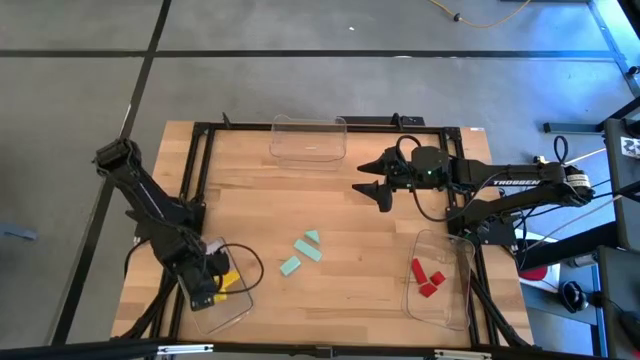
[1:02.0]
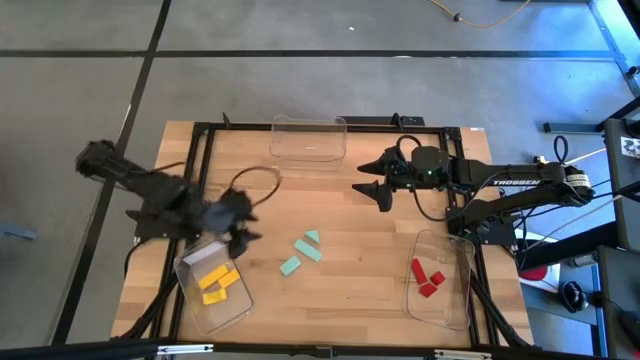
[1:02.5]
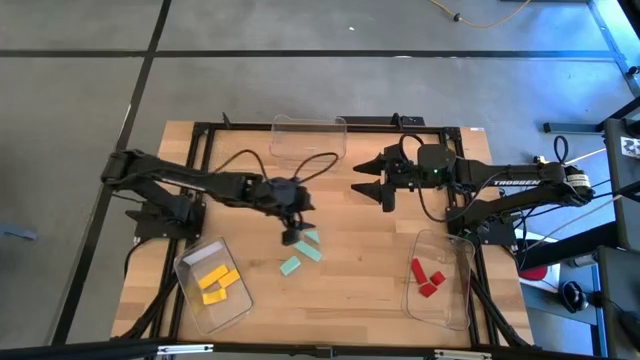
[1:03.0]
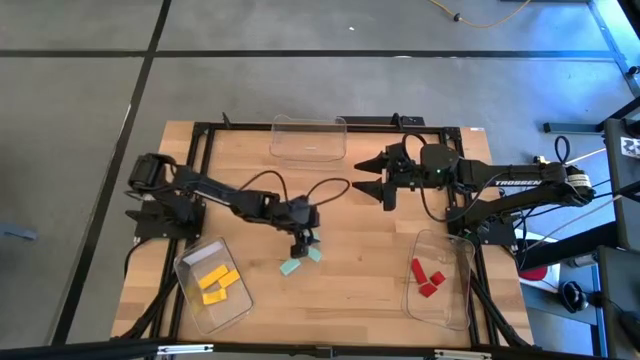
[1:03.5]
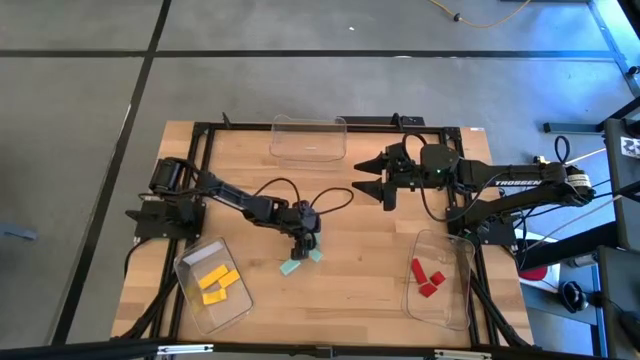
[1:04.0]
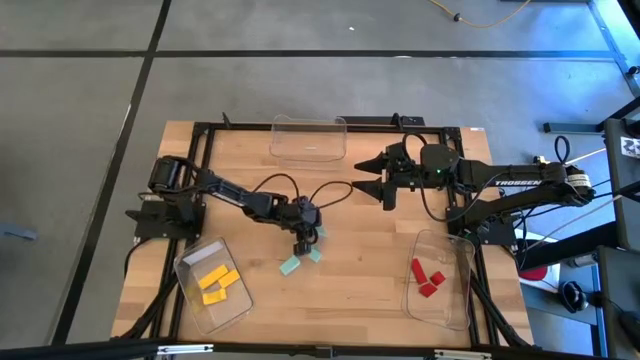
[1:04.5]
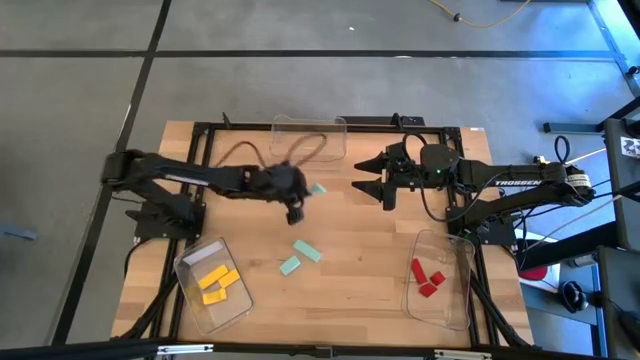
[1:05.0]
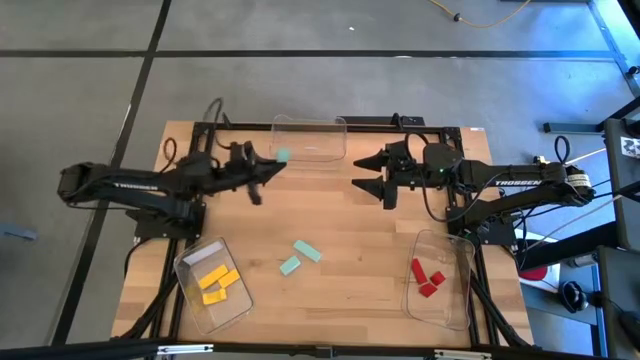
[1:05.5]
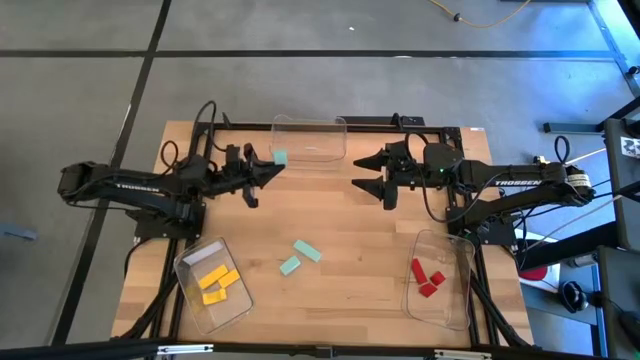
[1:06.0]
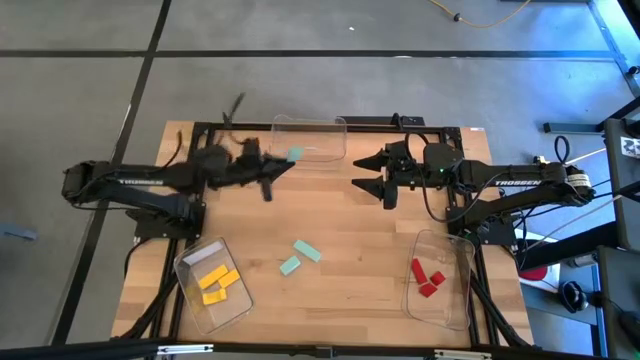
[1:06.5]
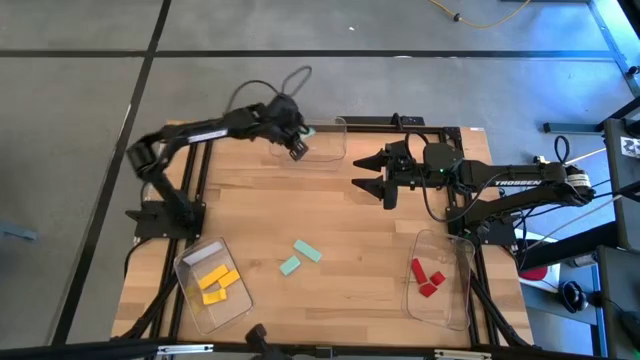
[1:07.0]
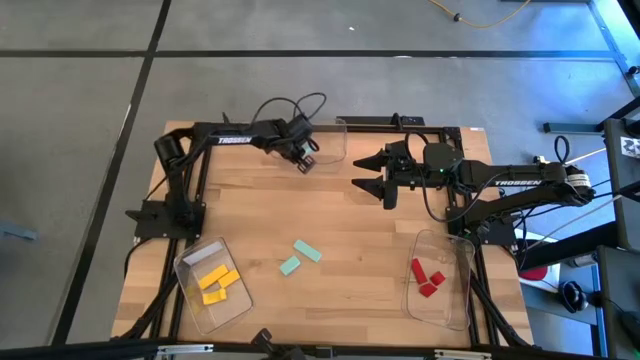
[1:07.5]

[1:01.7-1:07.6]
Task: Sort & place blocks by color
Put the top blue block into the top center transparent bin

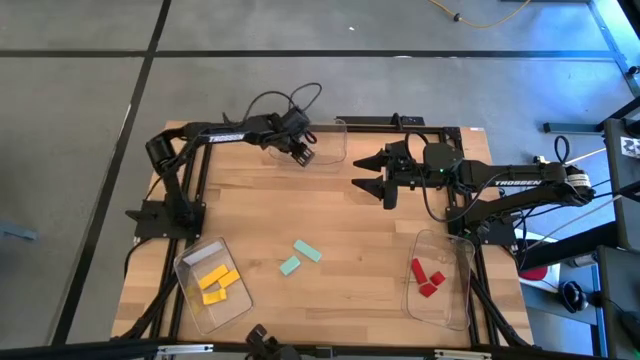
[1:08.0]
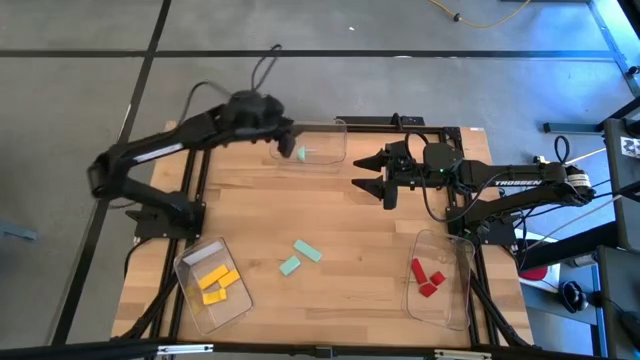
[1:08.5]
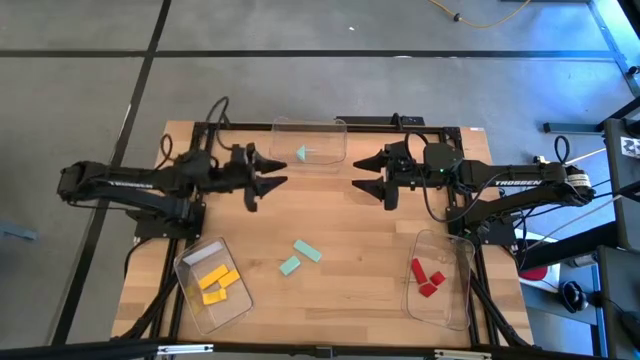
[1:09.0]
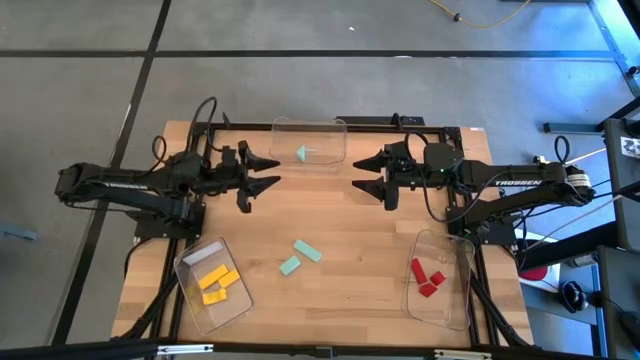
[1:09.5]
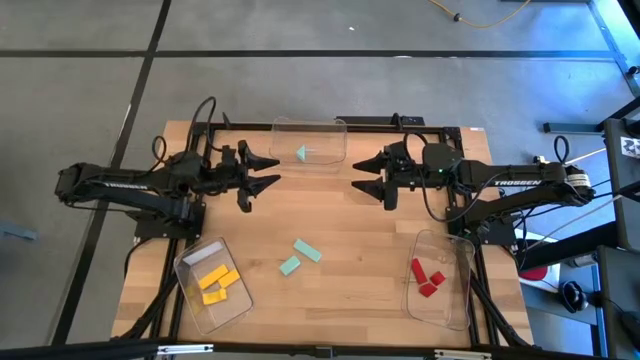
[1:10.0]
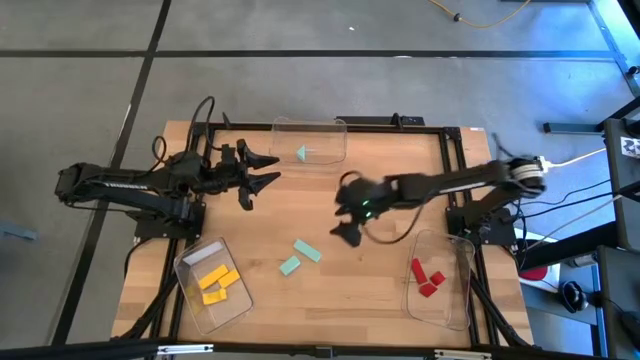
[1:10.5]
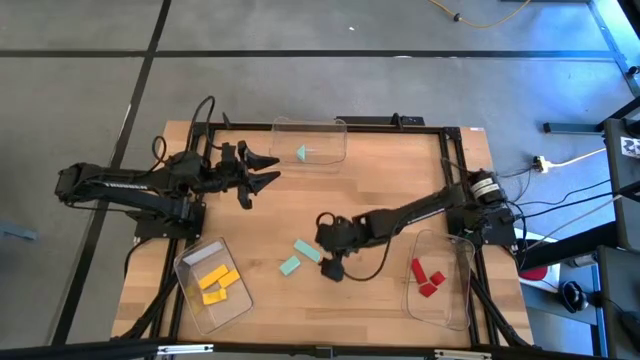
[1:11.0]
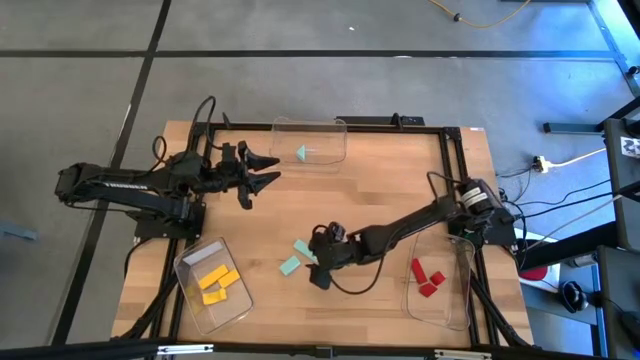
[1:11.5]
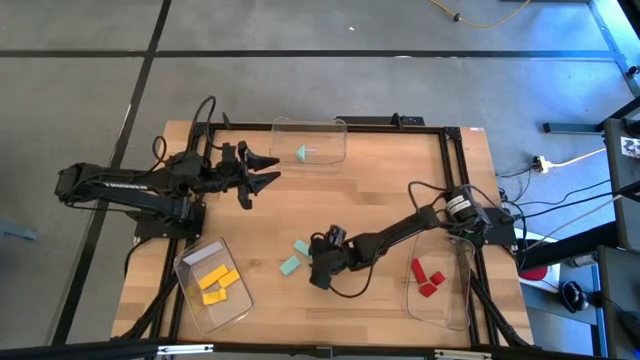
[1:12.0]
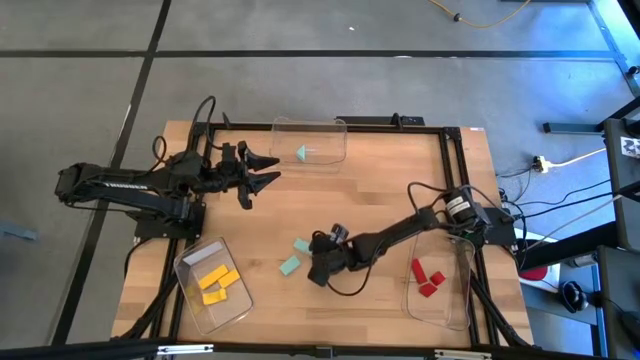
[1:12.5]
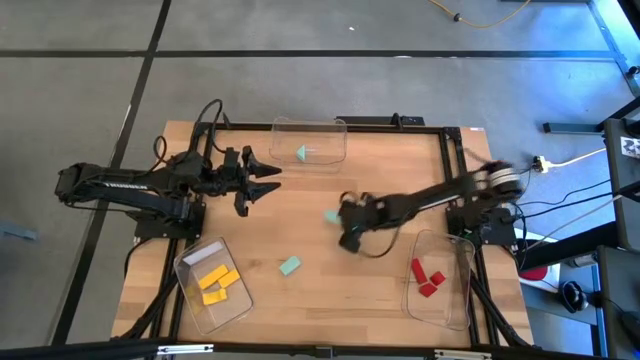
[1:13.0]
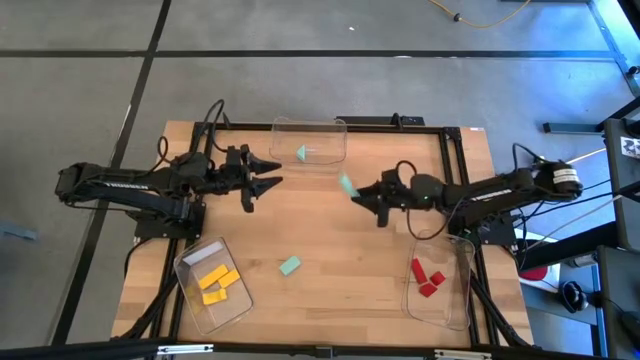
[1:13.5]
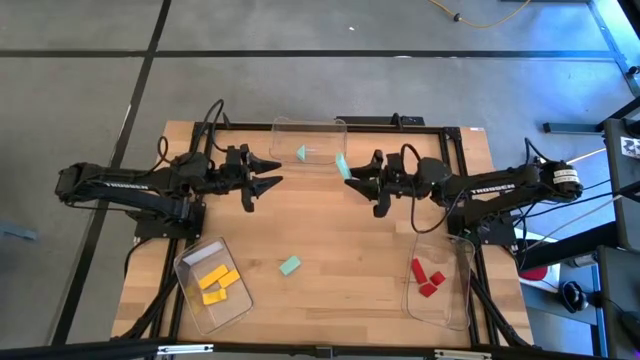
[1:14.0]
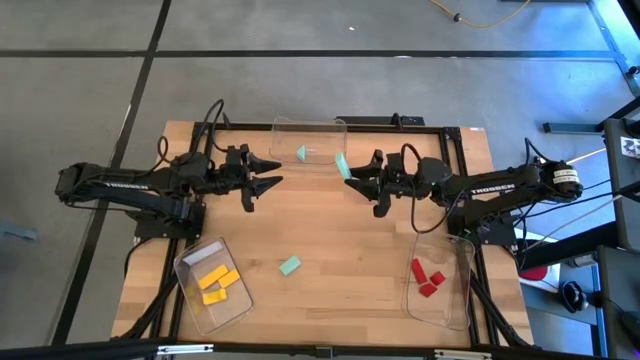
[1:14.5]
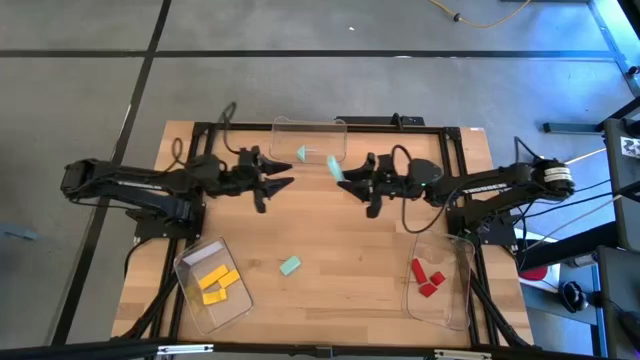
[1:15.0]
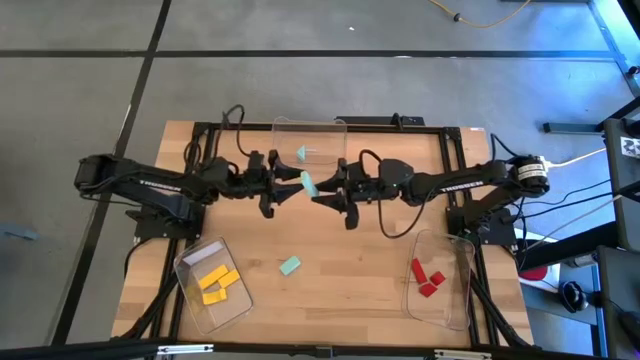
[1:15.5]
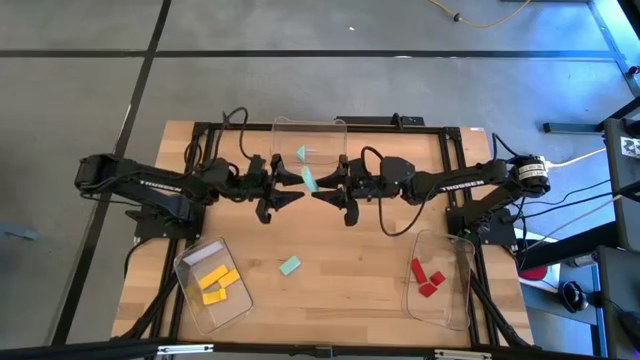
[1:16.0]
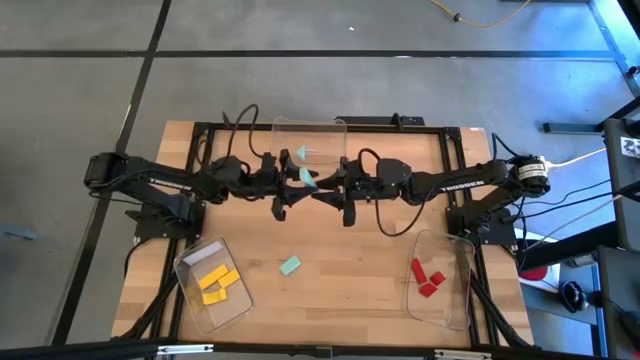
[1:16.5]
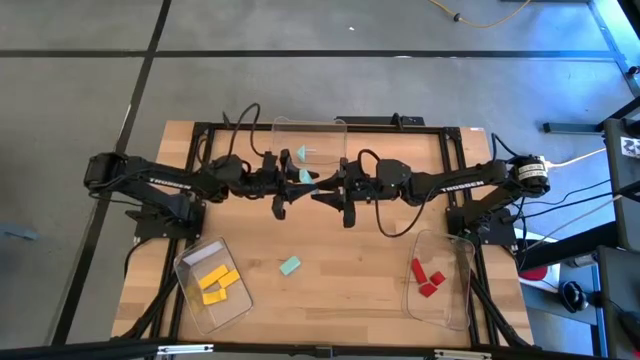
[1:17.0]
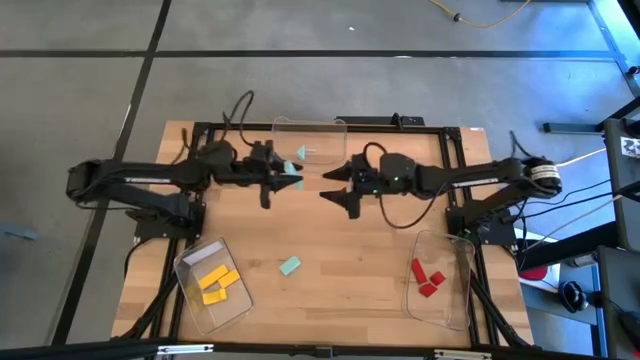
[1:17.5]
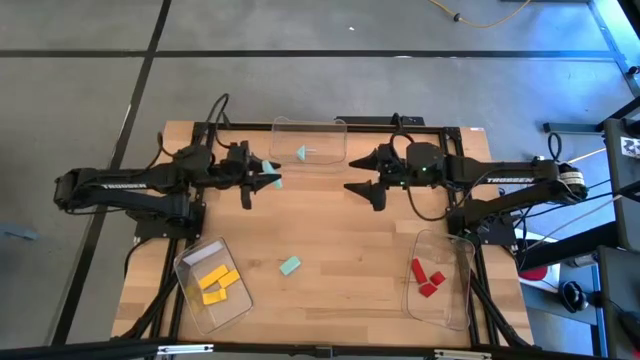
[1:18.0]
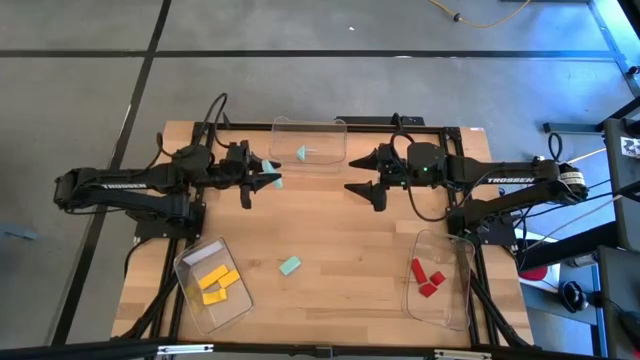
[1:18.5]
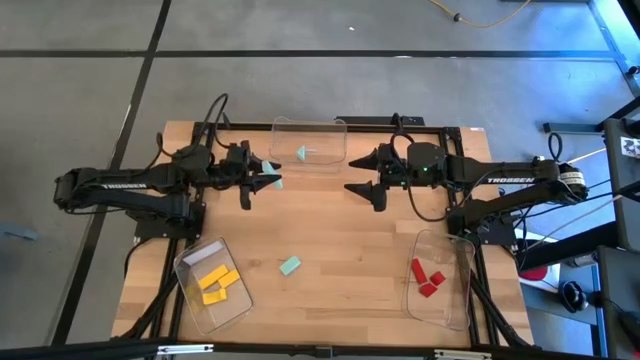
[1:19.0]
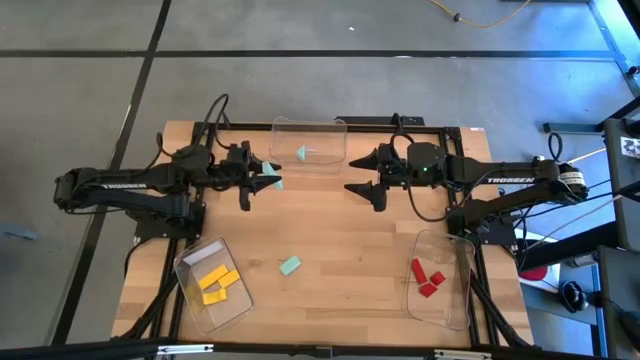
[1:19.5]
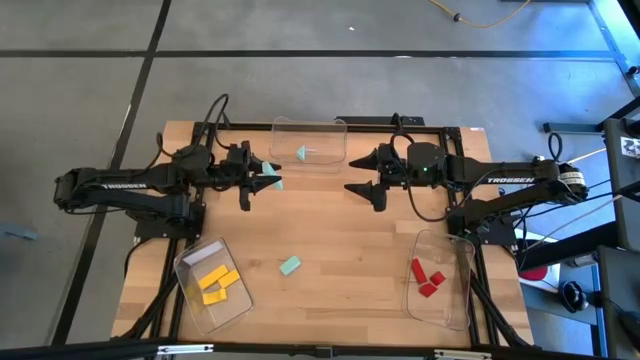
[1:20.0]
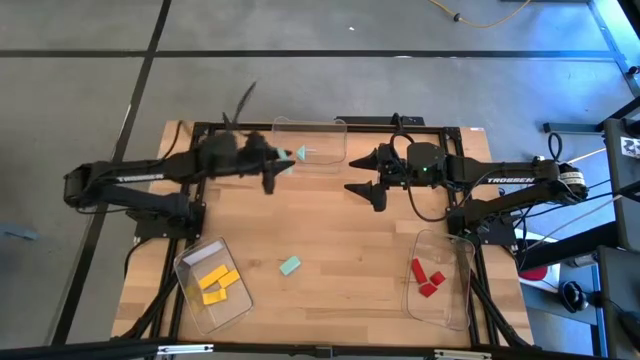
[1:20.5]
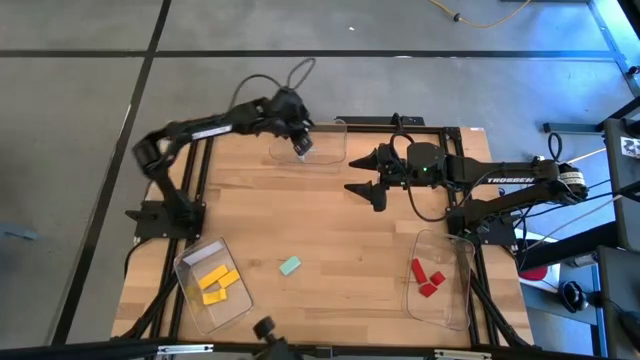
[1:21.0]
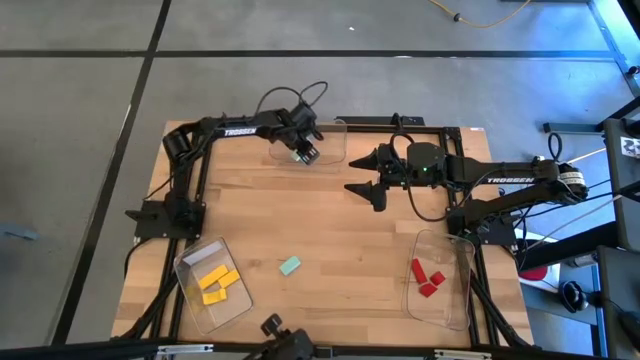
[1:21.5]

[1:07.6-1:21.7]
Put the top blue block into the top center transparent bin

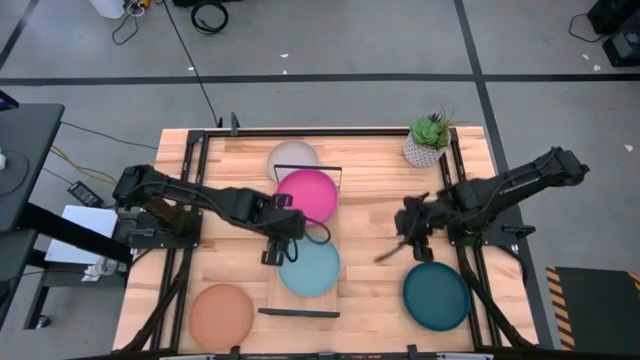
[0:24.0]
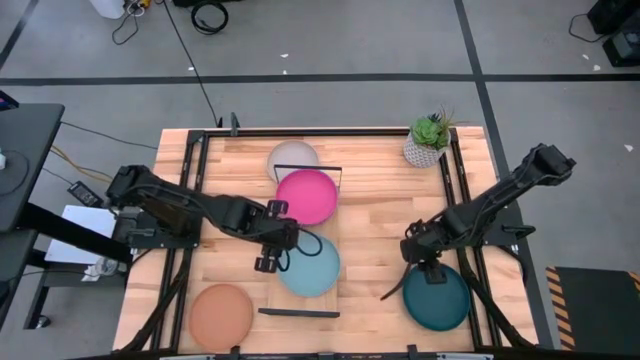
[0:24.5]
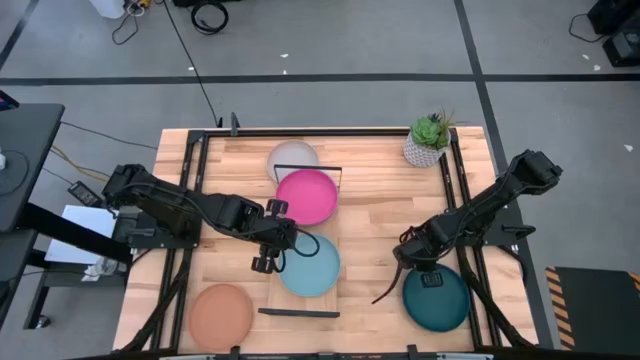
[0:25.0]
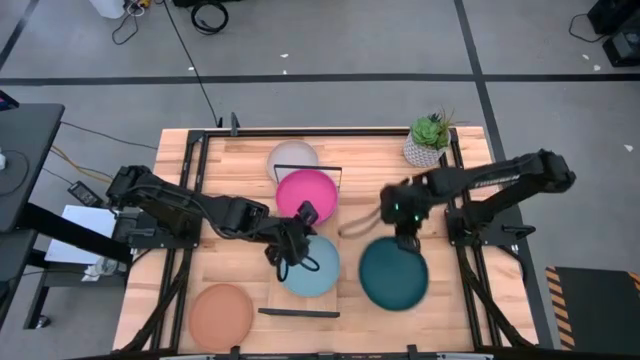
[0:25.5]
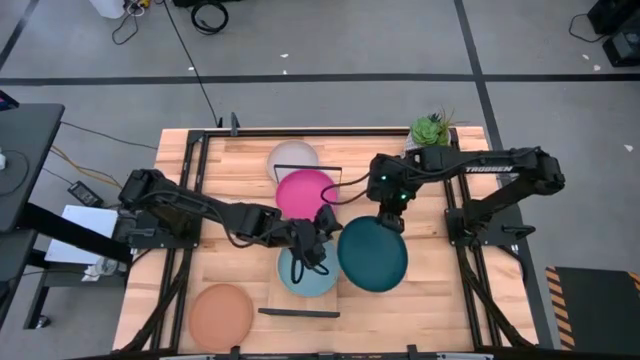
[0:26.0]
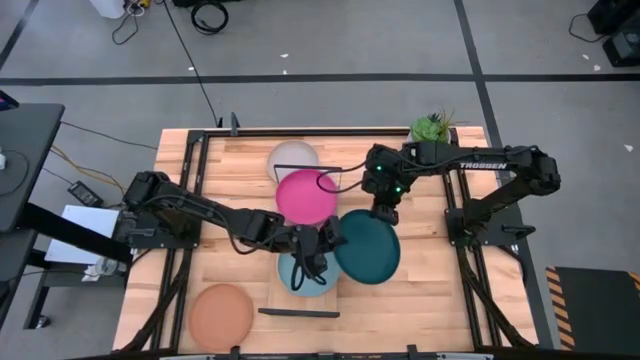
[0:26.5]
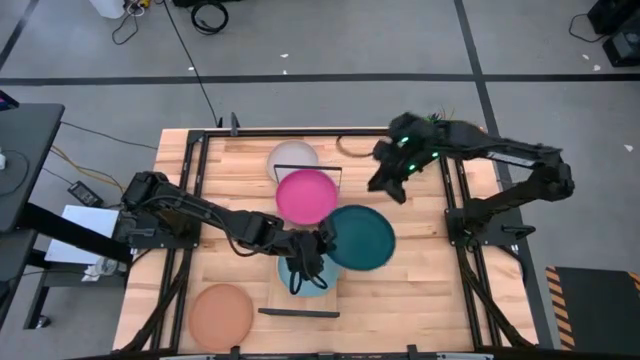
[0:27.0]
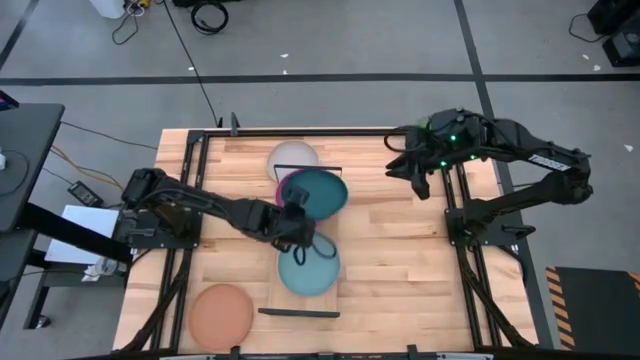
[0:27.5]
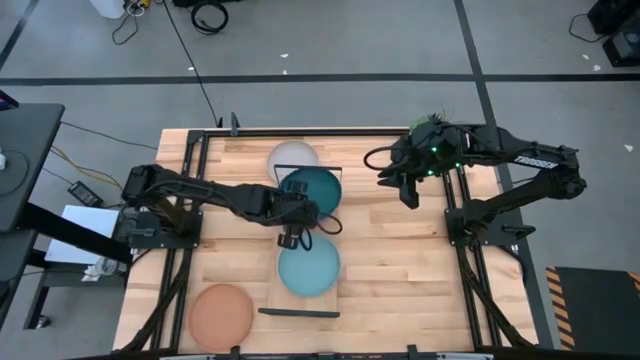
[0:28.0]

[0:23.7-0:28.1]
Task: Place and stack plates onto a shelf
Stack the dark blue plate on top of the pink plate on the shelf
